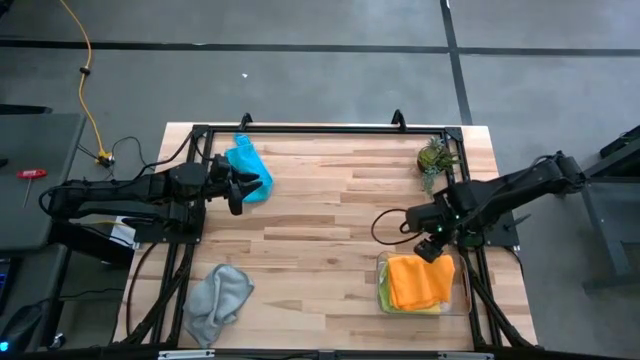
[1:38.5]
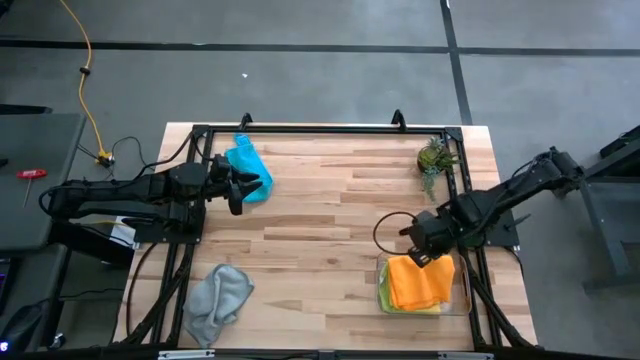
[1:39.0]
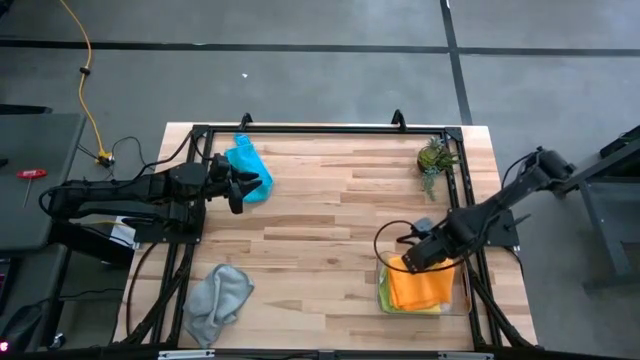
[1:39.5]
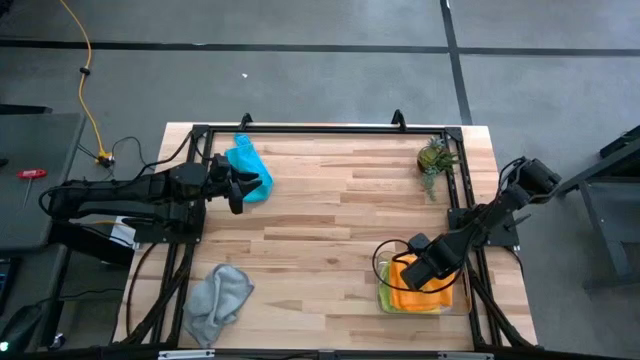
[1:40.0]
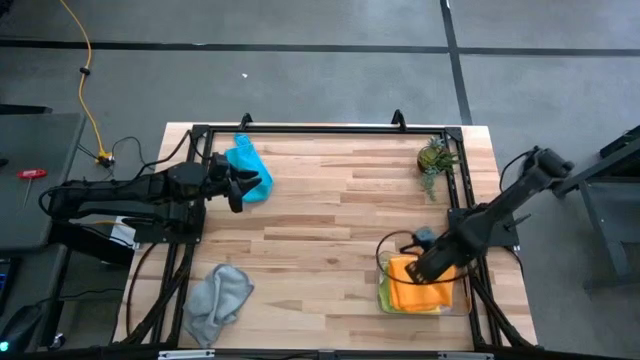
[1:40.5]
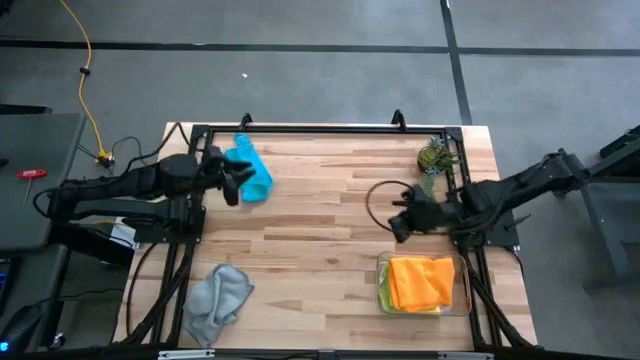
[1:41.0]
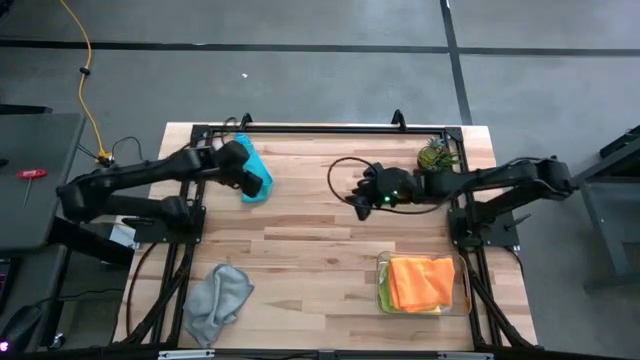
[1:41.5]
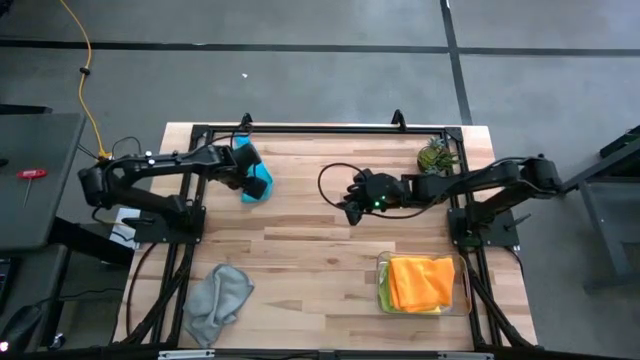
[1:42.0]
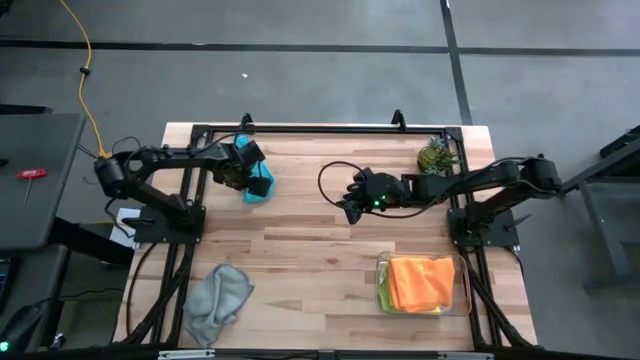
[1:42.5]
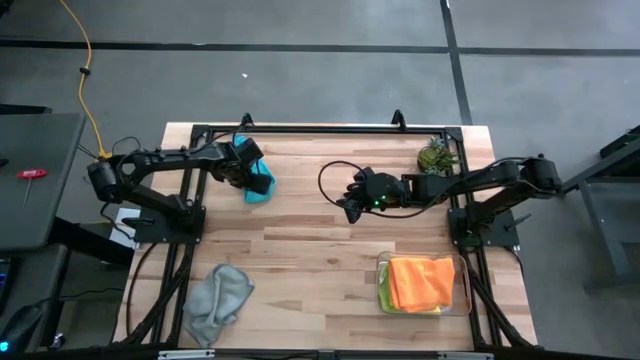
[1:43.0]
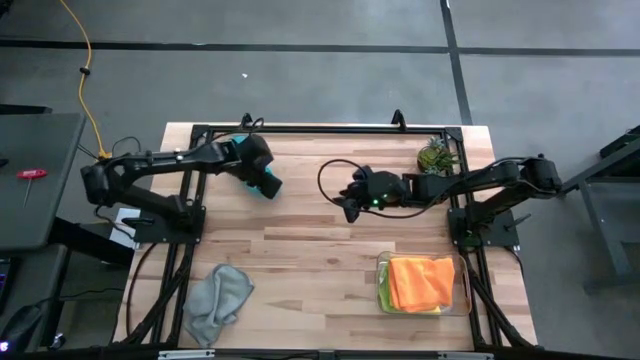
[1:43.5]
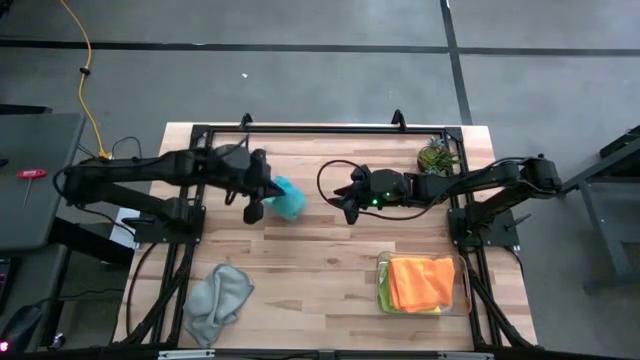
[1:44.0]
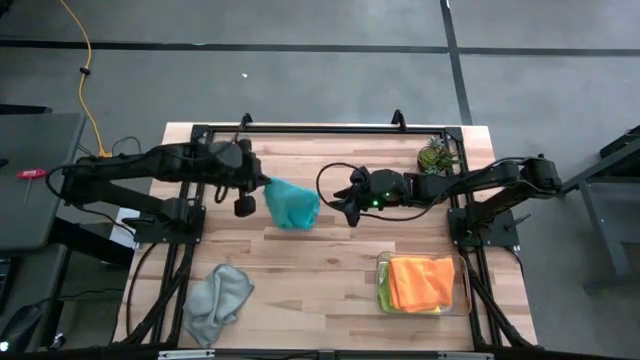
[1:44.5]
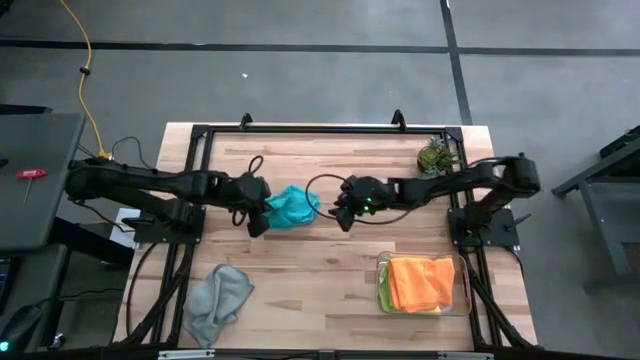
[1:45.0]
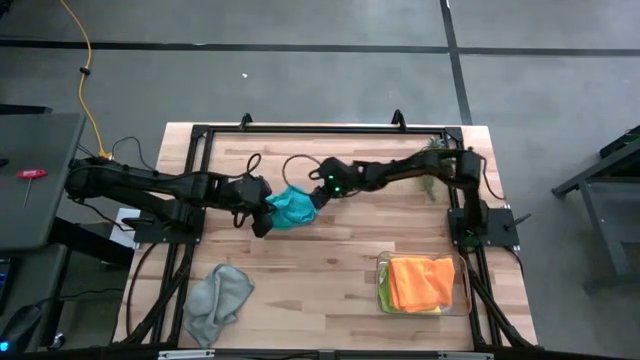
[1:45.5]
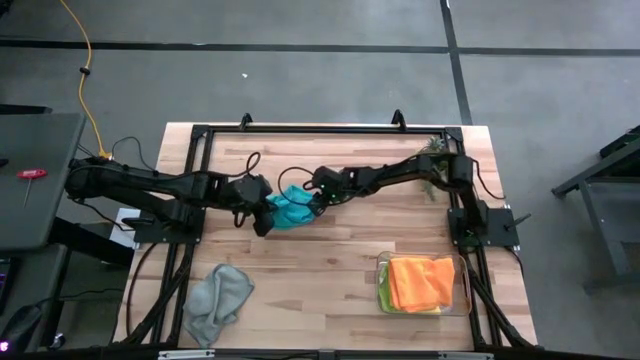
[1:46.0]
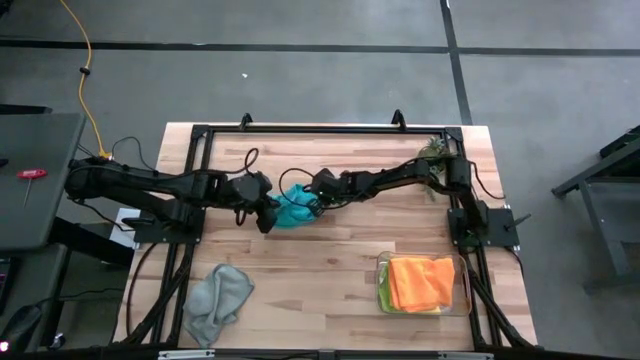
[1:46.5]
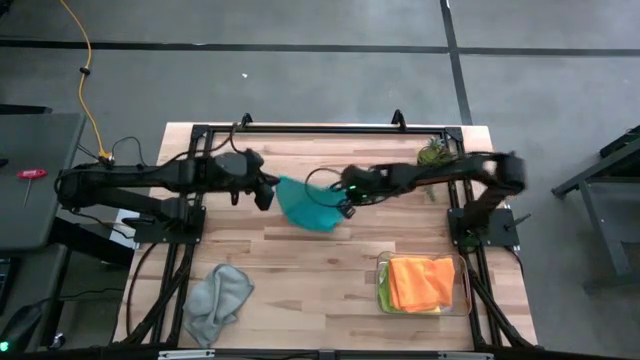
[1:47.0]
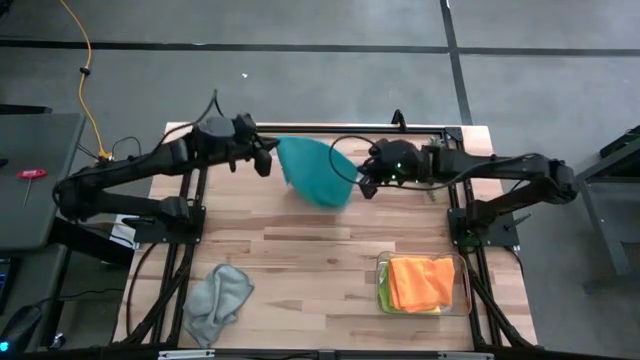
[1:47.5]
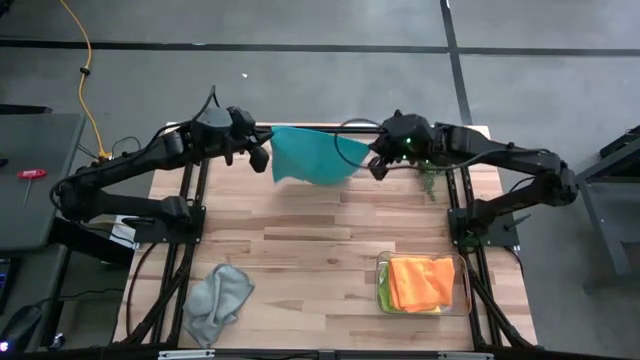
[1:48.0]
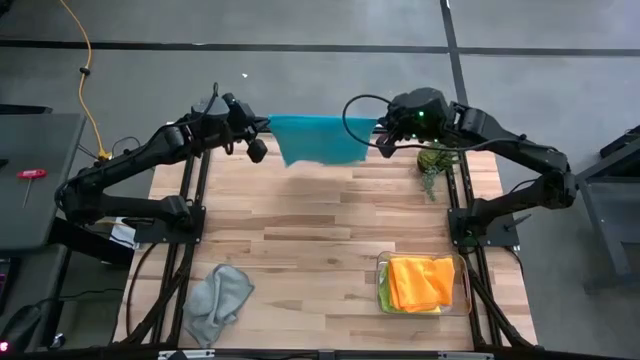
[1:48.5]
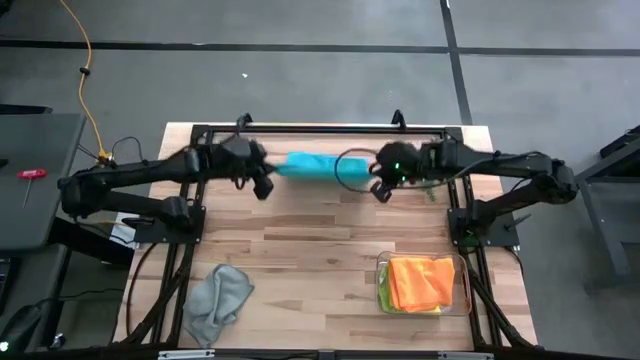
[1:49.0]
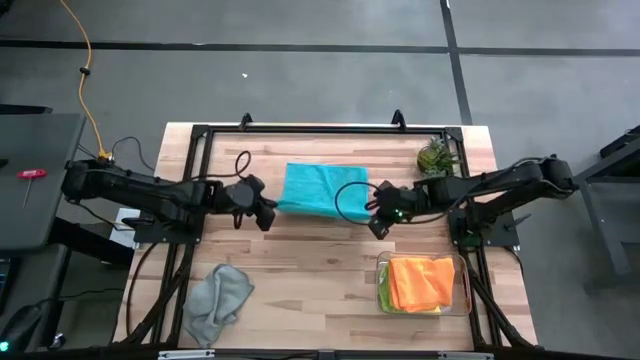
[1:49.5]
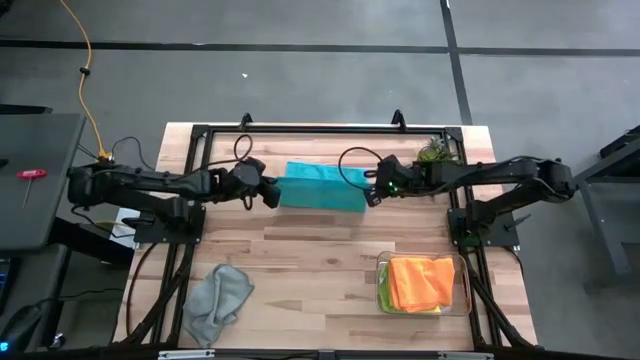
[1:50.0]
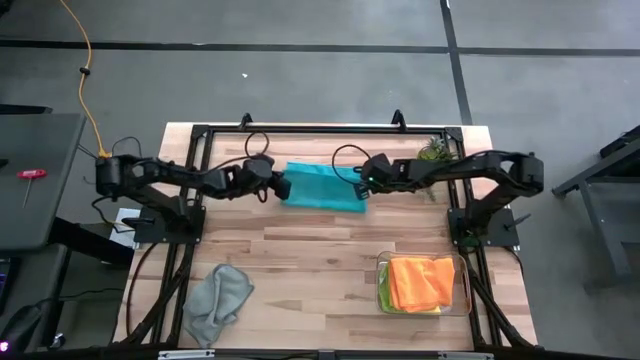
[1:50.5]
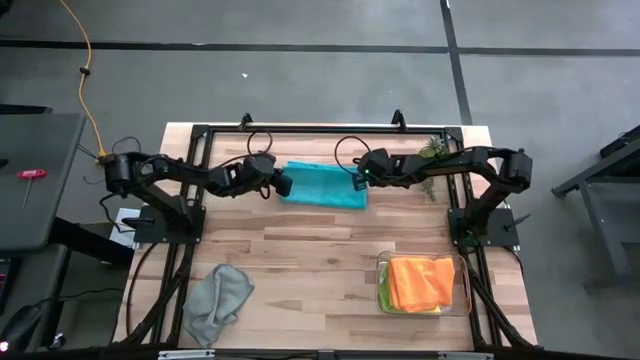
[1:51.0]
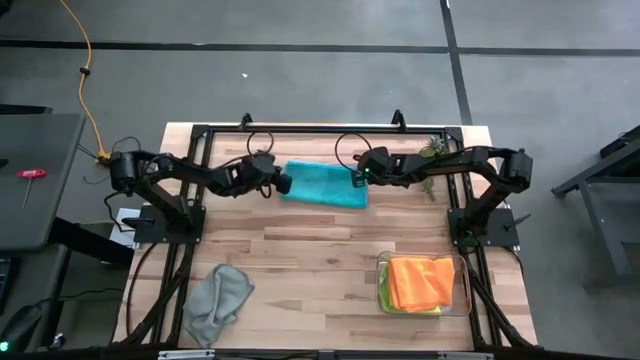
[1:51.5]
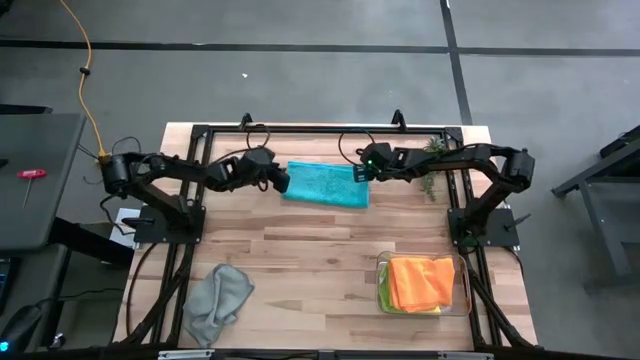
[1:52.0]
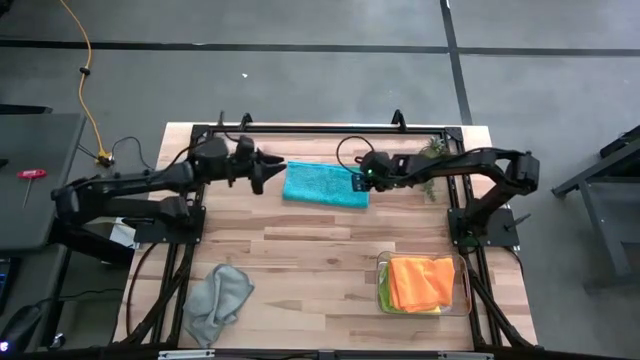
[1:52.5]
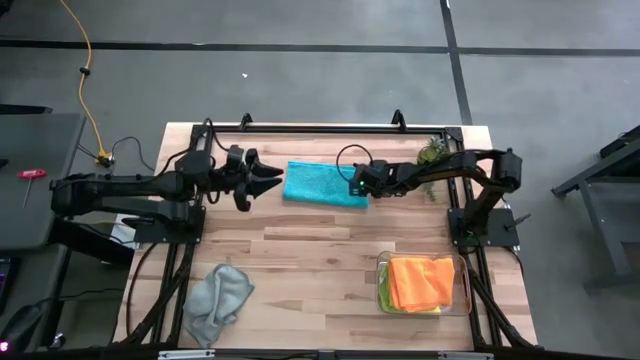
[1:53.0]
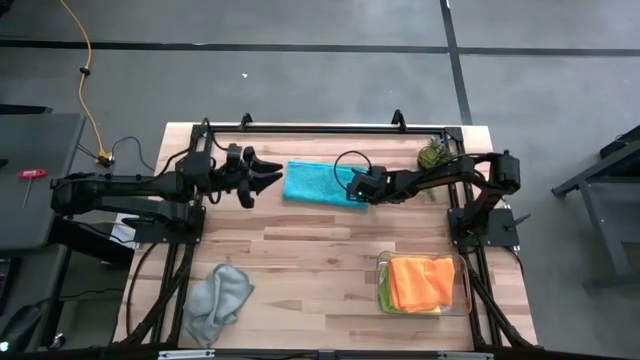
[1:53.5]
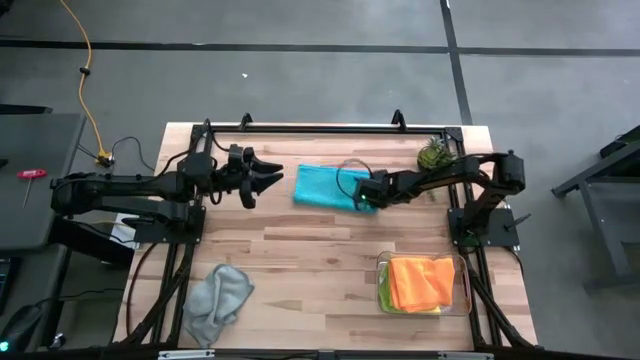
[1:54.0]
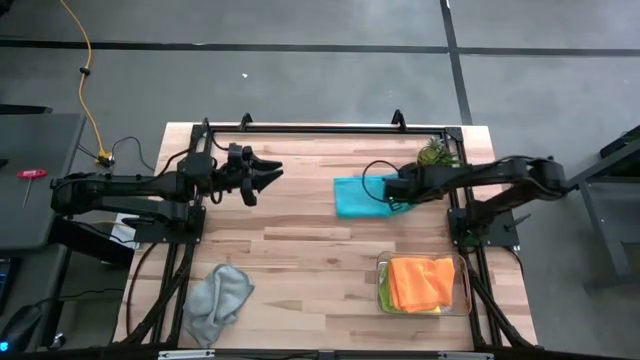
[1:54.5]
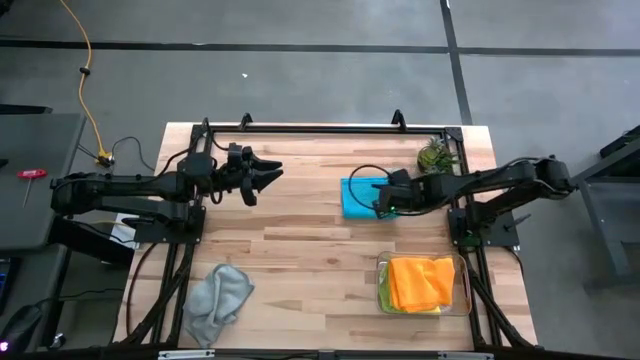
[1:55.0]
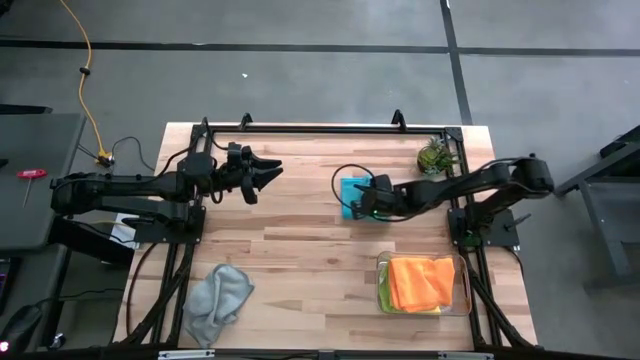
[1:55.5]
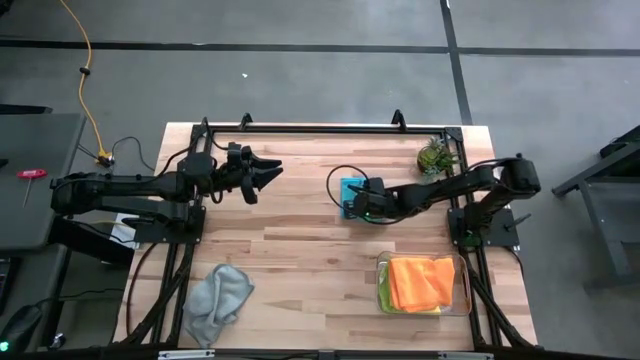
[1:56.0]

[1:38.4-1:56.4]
Task: Fold microfiber towels
Fold the blue microfiber cloth

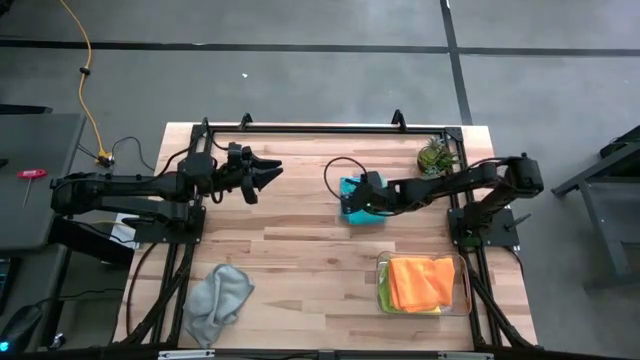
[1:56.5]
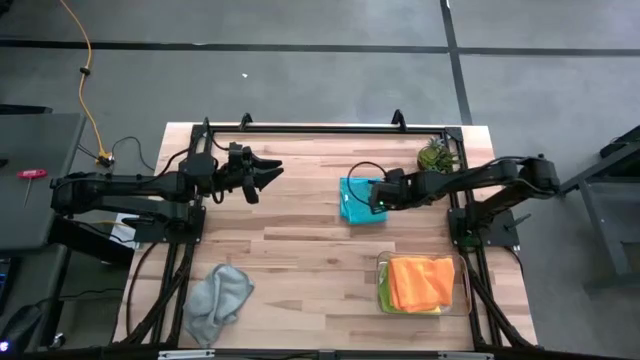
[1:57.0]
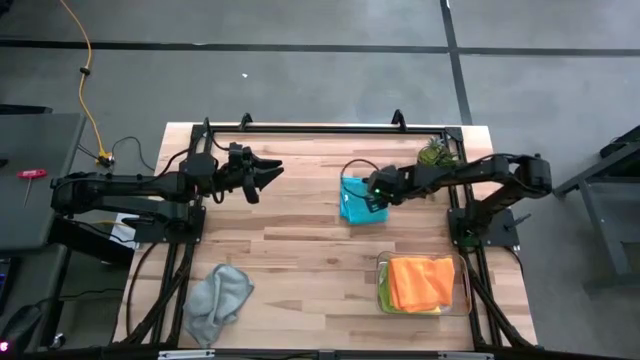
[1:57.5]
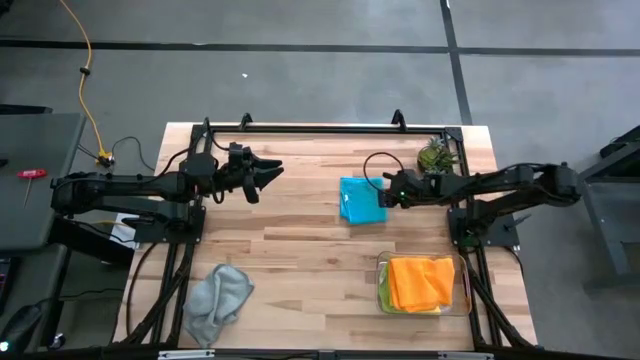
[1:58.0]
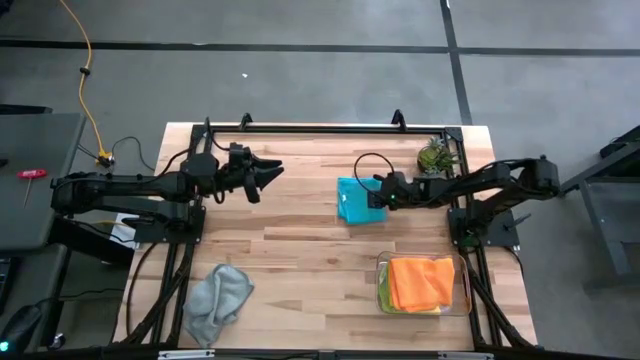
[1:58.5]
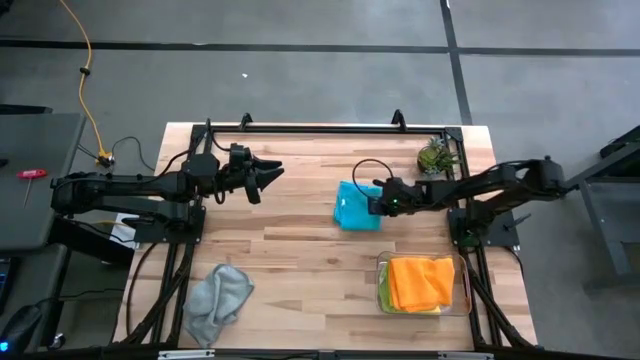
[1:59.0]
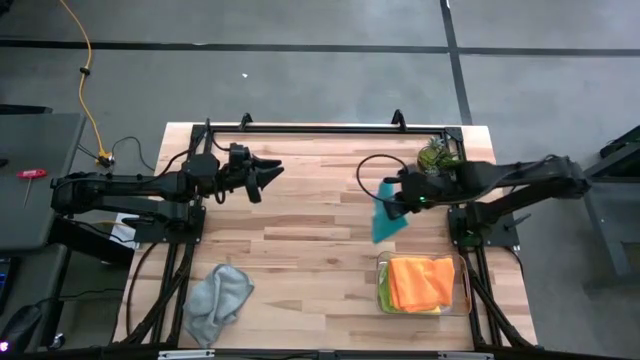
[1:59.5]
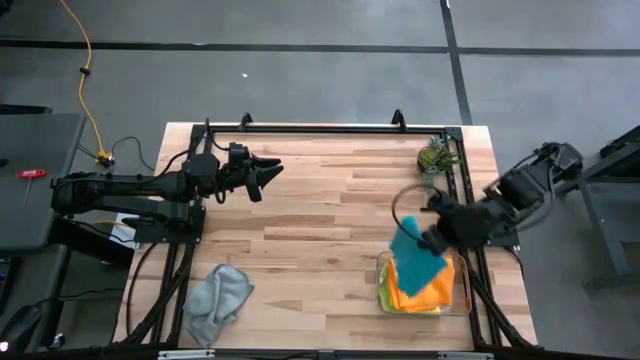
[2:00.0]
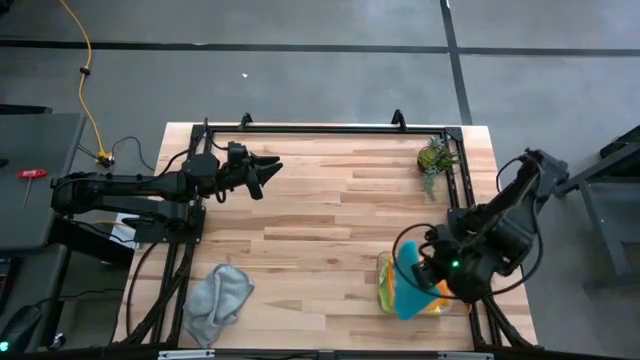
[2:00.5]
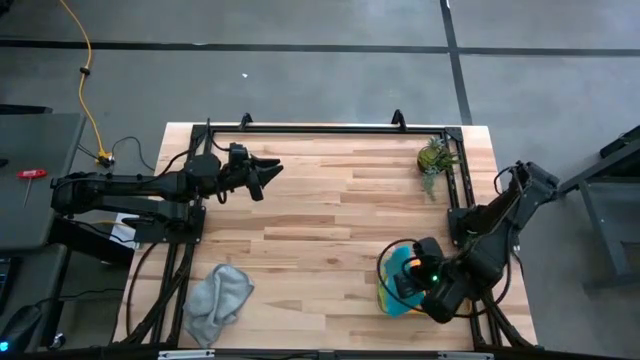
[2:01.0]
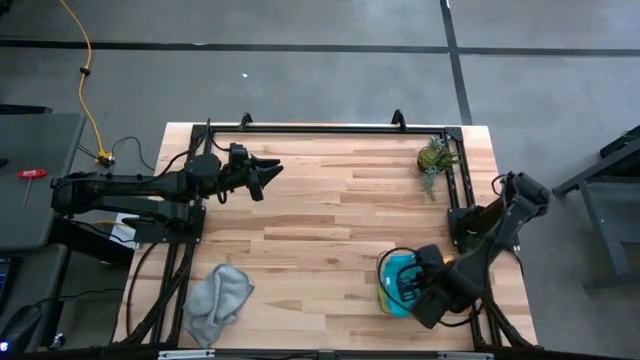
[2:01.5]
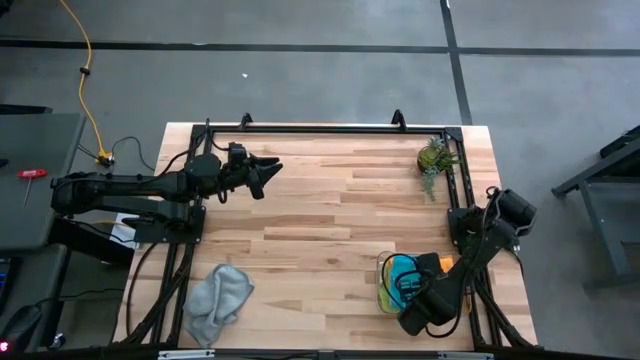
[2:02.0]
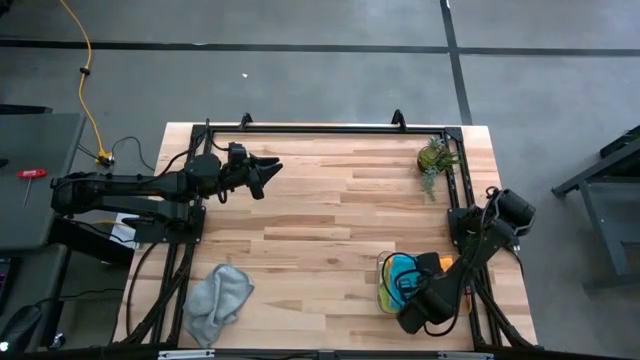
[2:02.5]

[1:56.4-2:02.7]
Put the blue microfiber cloth into the transparent bin
